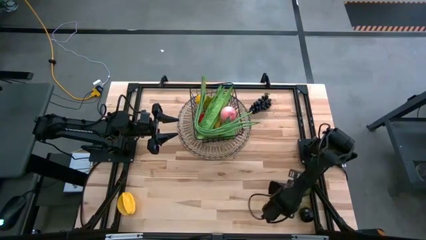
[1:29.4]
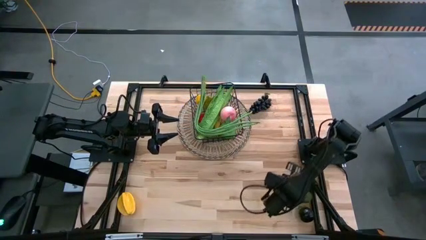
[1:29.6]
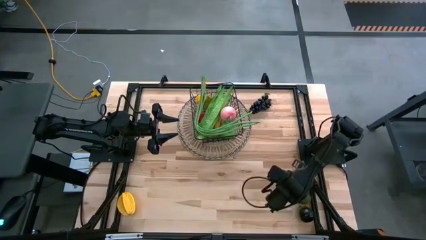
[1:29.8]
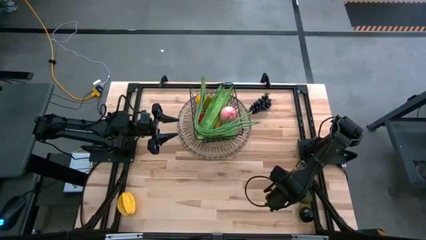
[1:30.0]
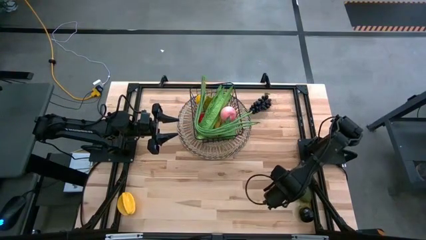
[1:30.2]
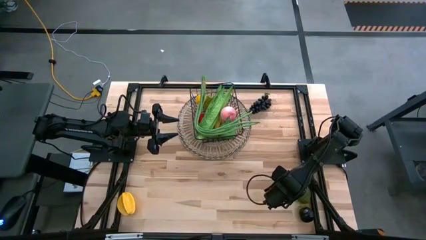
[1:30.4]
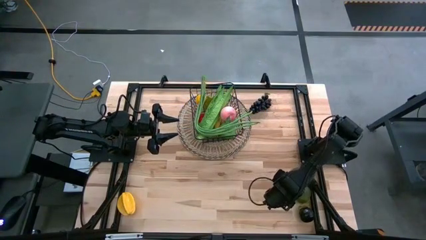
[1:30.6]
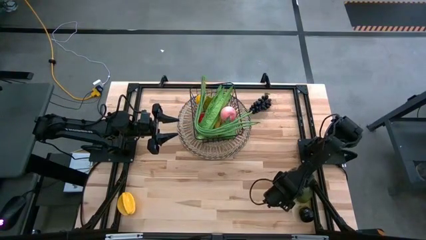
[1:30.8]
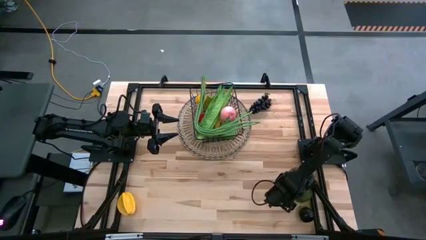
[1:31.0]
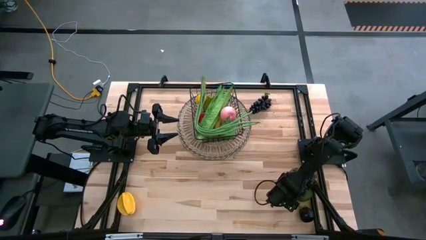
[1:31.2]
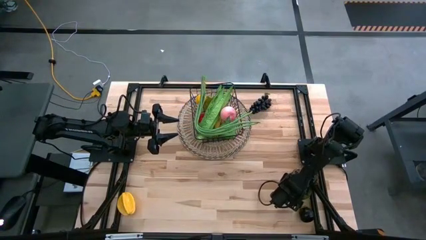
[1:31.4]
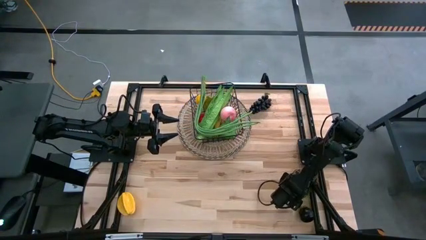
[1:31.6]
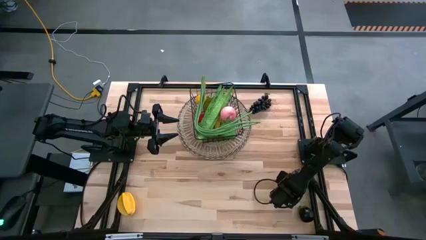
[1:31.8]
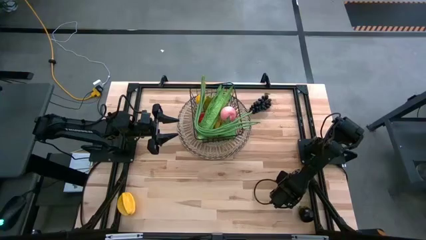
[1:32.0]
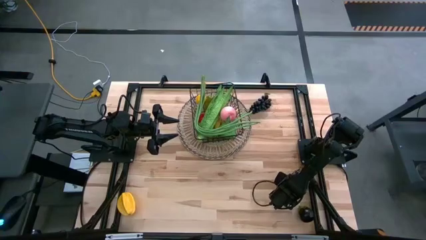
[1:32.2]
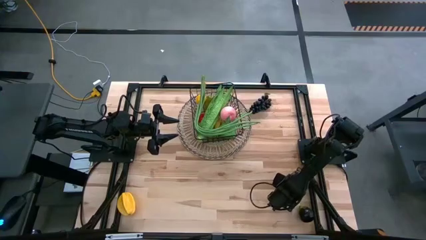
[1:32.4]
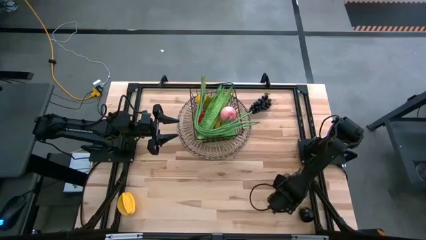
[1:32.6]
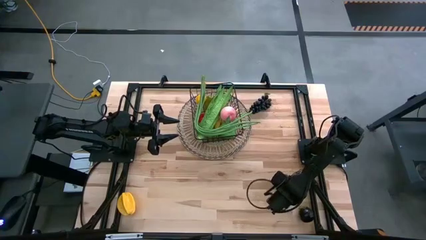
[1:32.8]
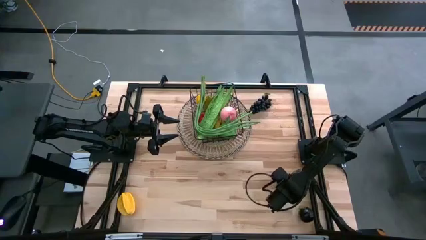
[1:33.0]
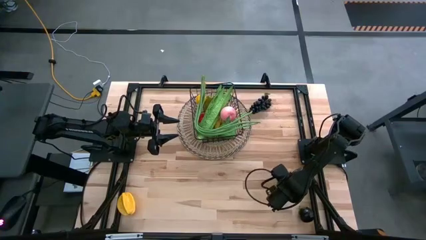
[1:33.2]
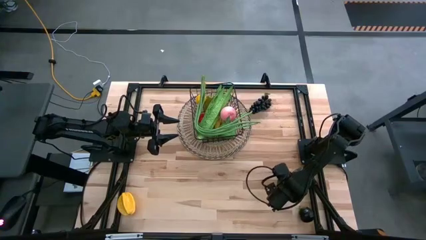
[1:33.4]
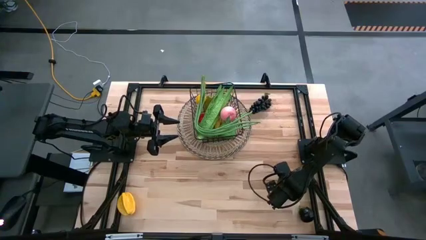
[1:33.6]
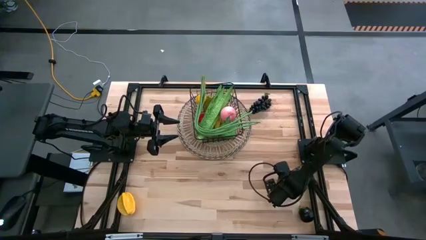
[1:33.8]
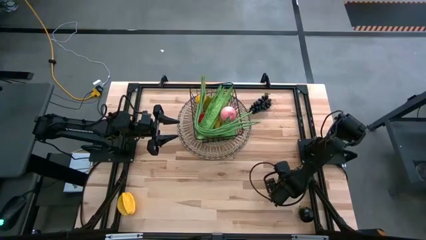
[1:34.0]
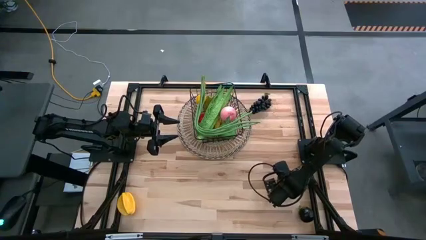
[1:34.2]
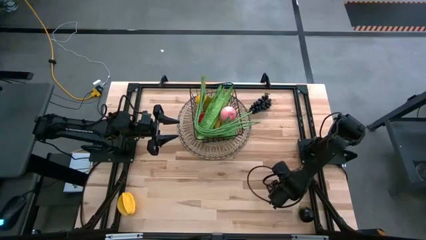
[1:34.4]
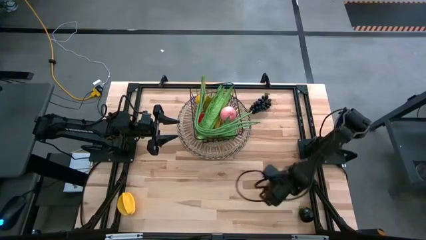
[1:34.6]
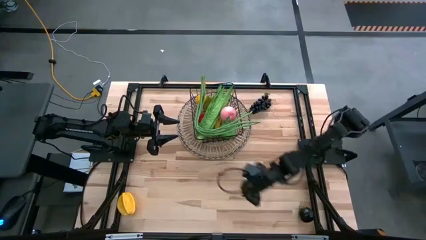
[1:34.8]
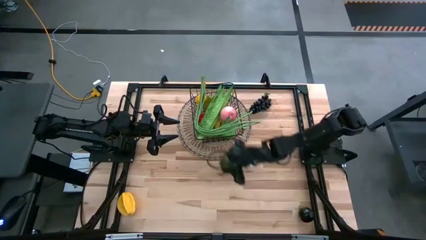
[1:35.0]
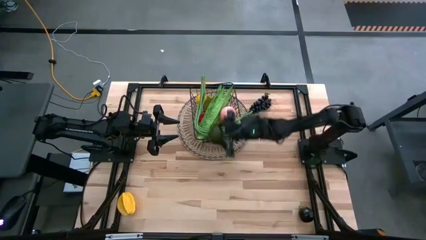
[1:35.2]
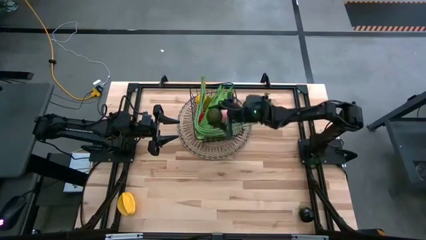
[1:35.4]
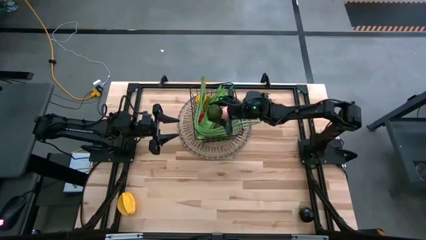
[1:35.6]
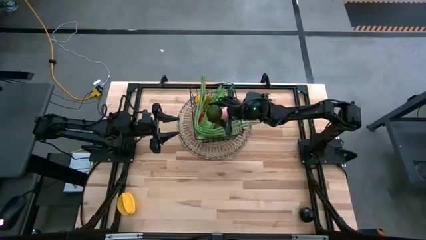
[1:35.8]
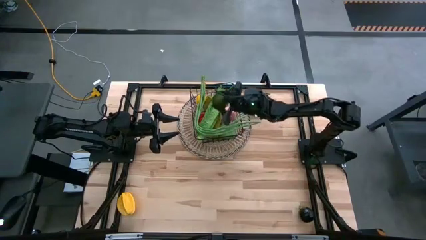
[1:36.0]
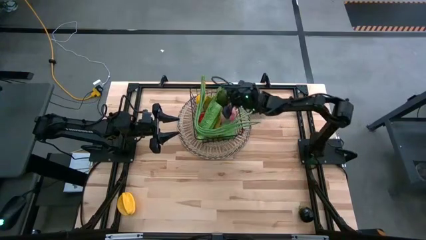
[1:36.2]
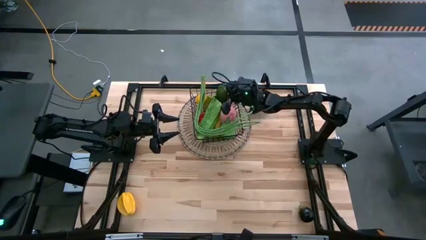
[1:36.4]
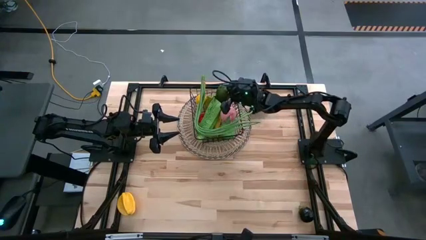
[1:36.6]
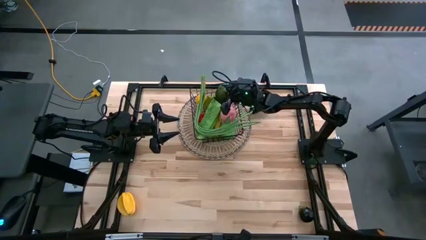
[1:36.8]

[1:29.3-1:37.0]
Task: Build produce basket
Put the green lime into the black mesh basket

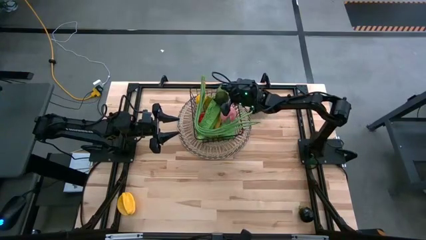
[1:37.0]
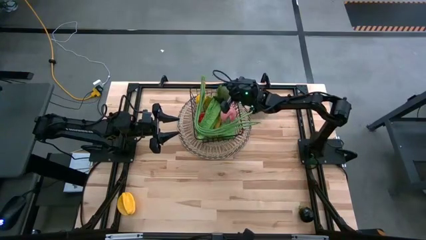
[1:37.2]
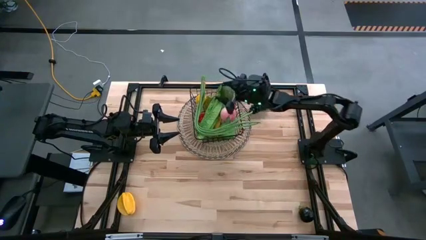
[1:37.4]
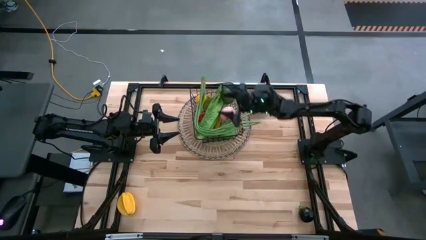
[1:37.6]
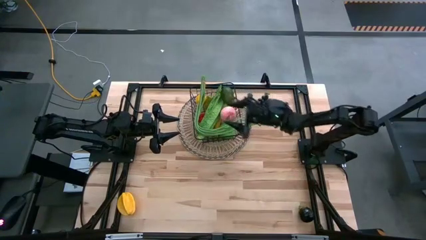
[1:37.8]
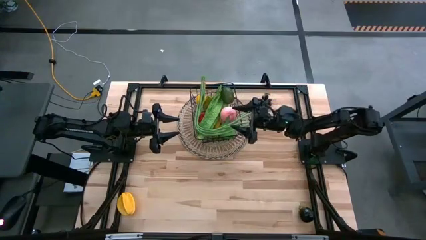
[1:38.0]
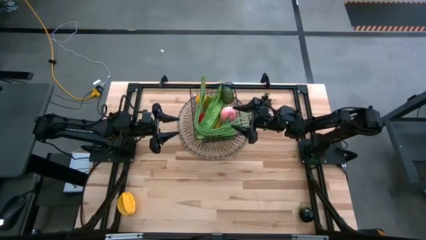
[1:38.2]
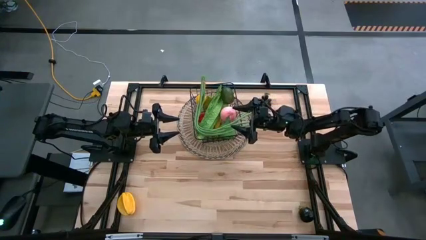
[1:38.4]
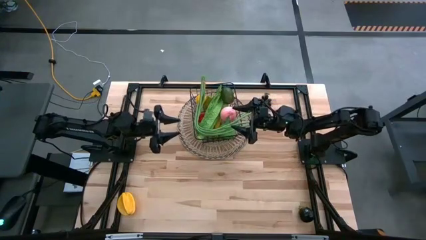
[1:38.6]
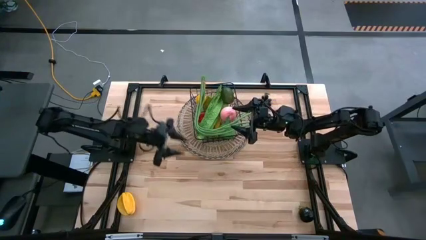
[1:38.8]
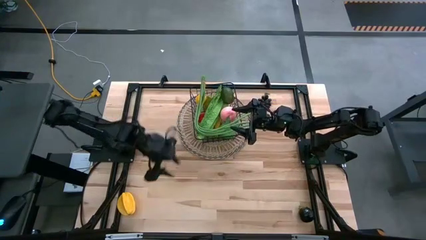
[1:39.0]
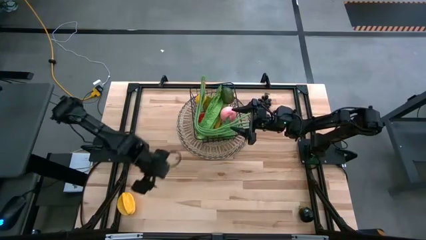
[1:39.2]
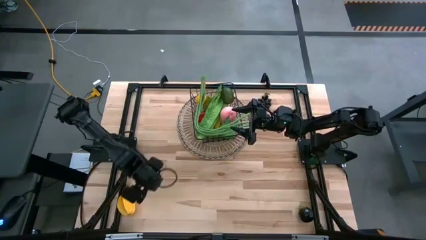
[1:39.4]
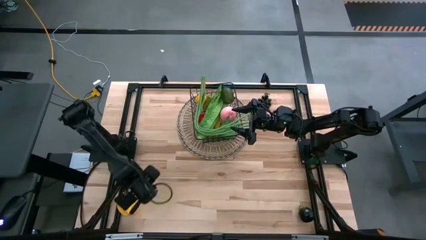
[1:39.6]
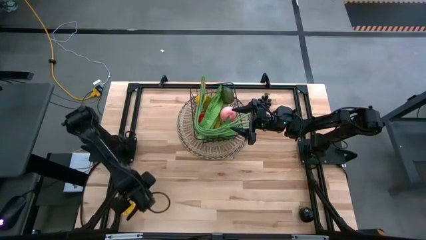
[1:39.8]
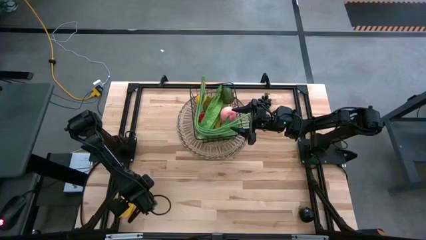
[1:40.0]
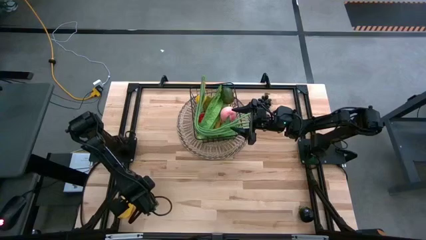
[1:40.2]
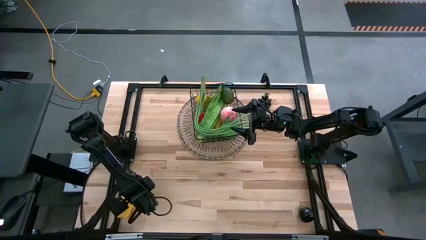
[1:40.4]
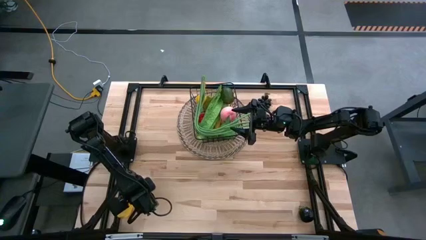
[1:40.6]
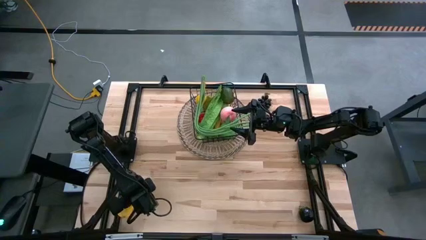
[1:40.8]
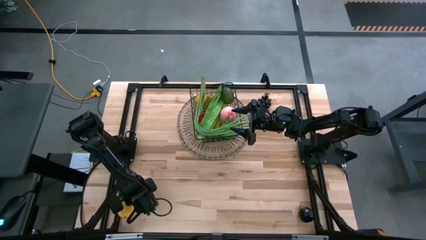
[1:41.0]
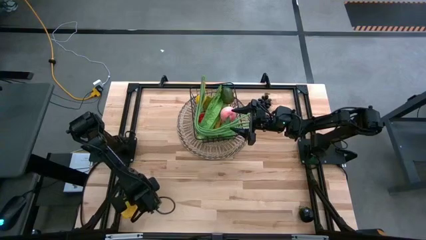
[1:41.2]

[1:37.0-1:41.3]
Put the starfruit into the black mesh basket

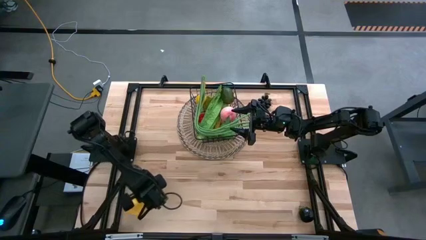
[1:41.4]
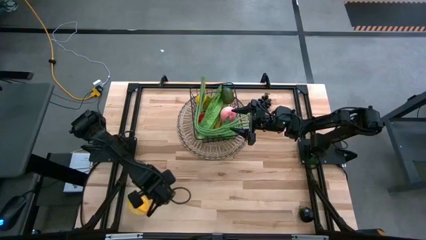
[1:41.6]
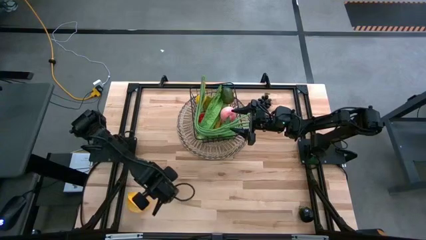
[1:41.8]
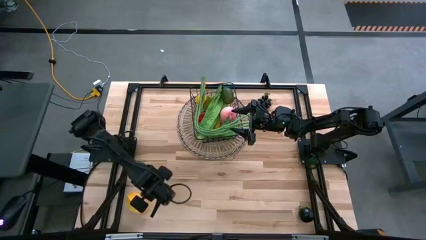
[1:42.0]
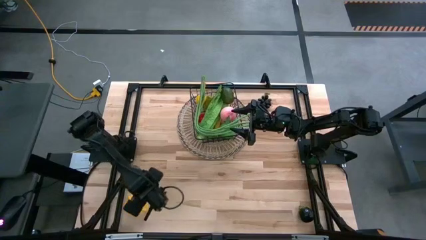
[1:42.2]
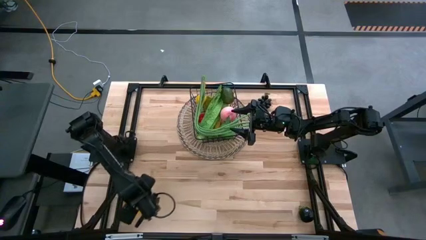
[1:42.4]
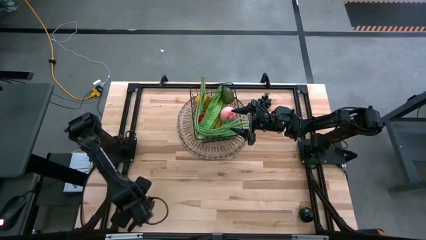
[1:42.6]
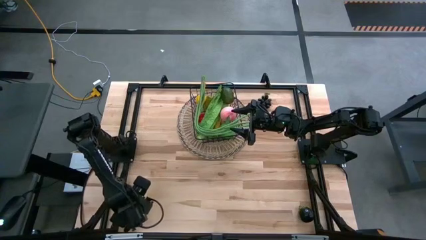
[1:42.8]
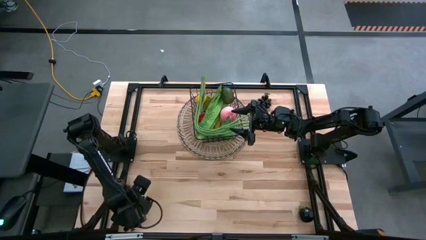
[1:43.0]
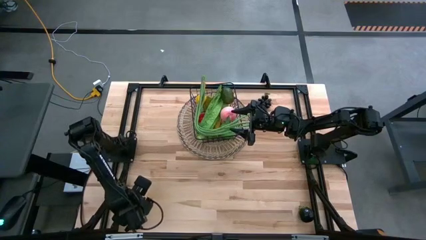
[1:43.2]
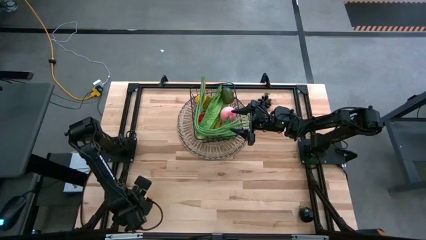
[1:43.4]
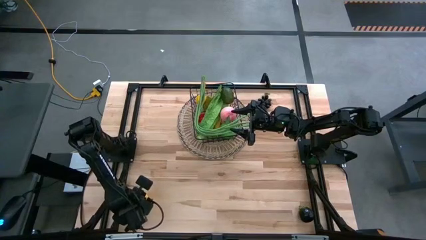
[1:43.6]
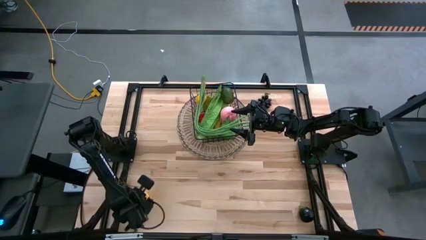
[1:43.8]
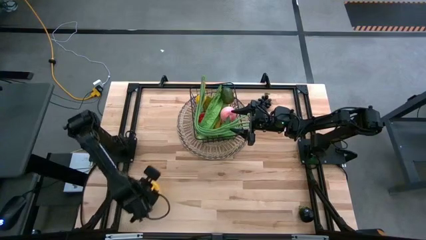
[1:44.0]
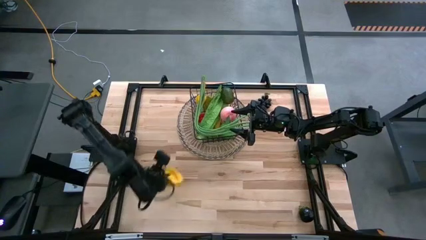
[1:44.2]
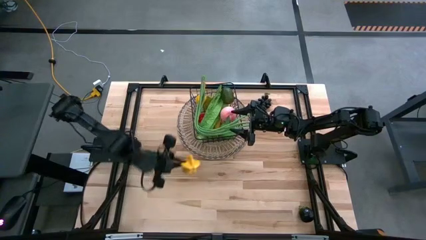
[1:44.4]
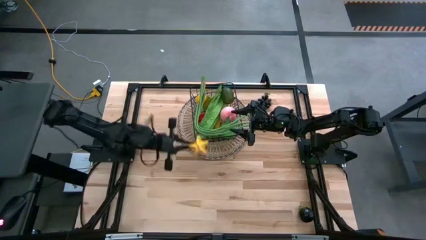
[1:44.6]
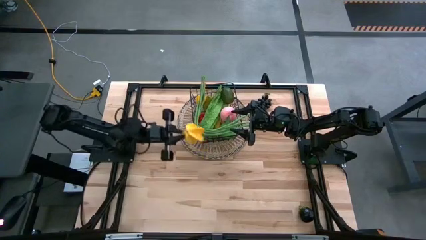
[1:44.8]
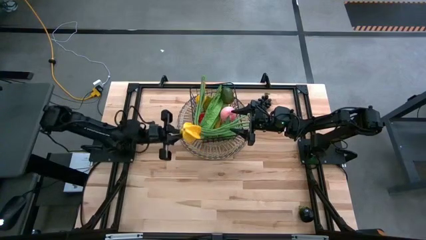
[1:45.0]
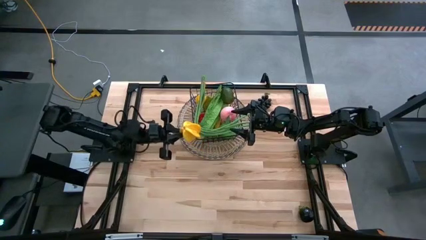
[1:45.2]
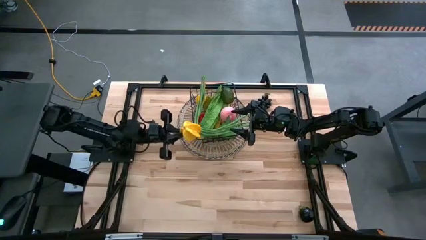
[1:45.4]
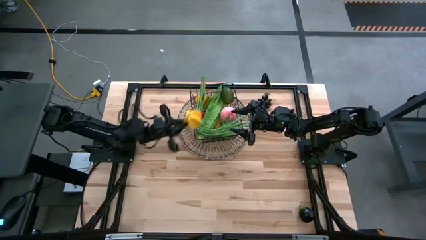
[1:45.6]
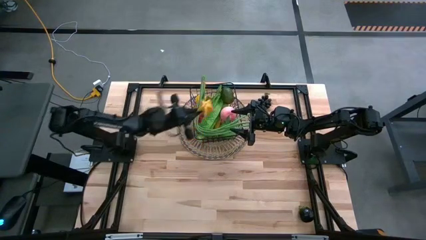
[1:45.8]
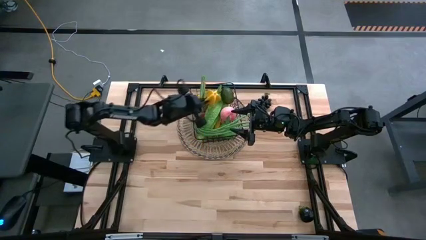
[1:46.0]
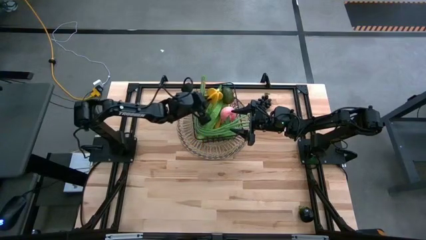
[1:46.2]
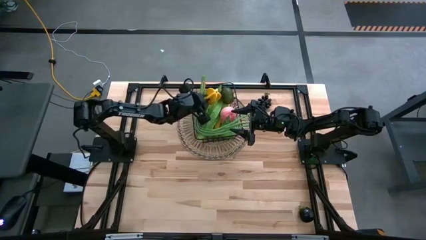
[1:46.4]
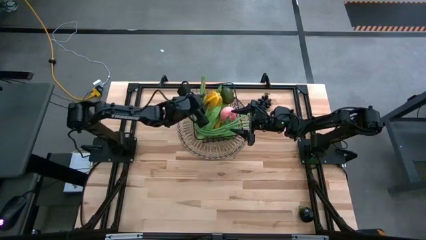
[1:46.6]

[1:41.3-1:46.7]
Put the starfruit into the black mesh basket
